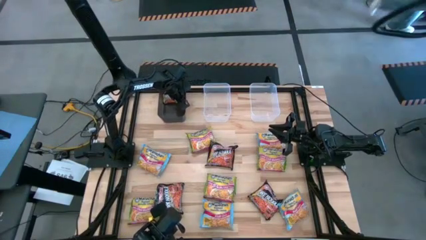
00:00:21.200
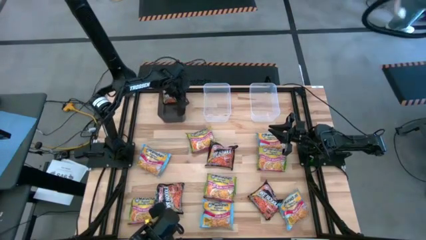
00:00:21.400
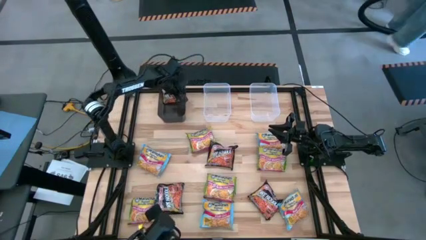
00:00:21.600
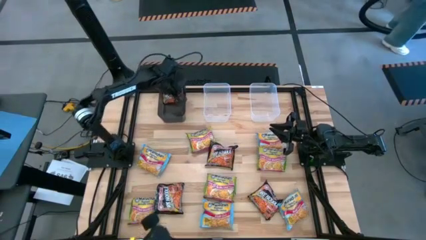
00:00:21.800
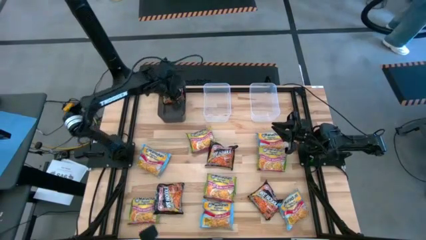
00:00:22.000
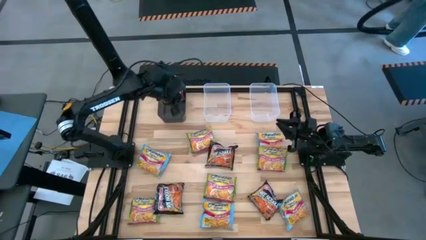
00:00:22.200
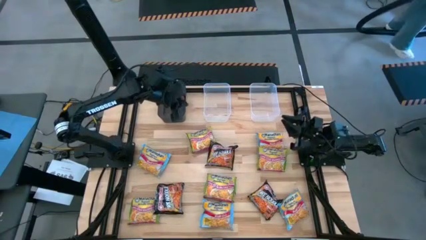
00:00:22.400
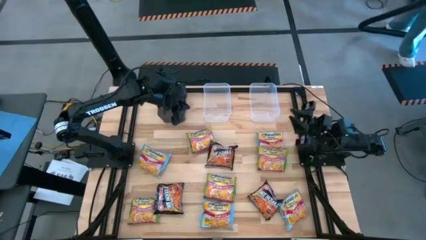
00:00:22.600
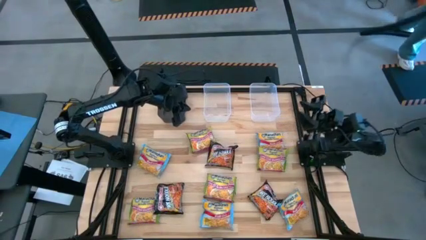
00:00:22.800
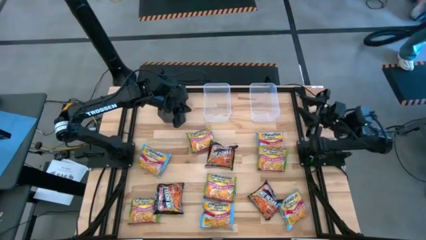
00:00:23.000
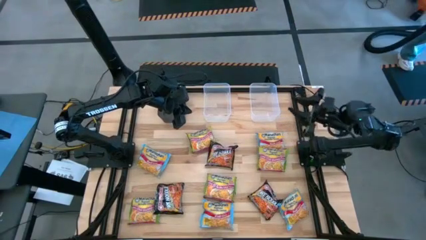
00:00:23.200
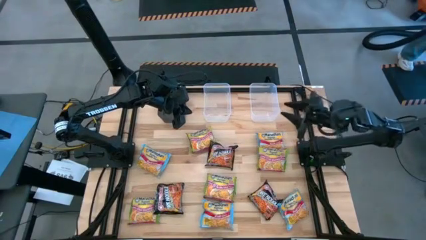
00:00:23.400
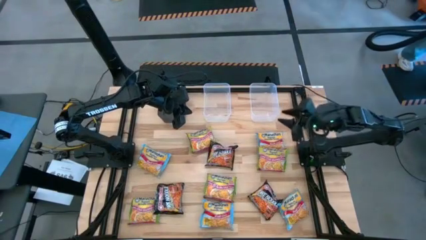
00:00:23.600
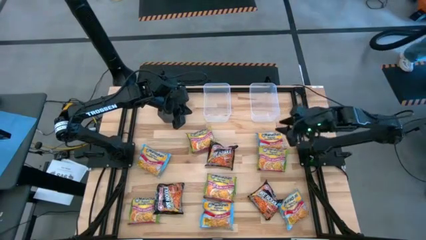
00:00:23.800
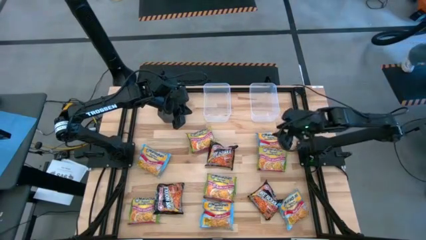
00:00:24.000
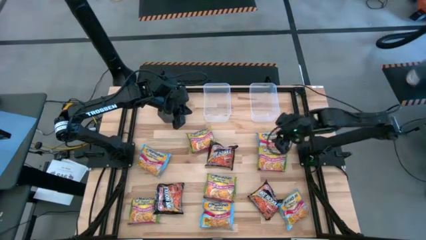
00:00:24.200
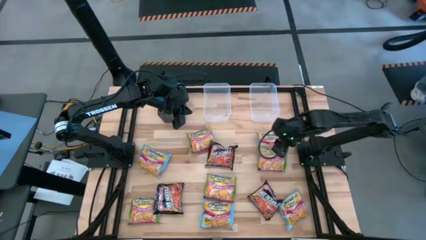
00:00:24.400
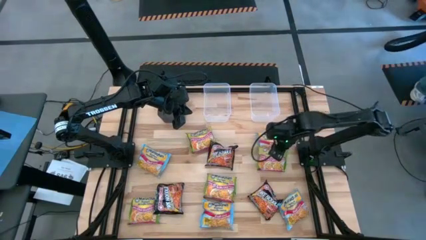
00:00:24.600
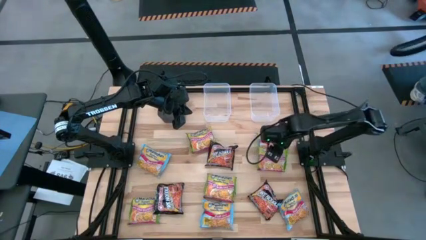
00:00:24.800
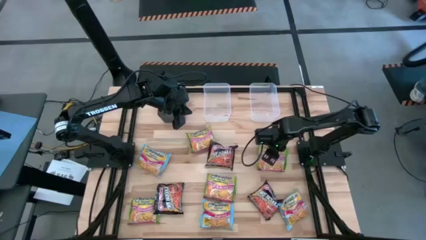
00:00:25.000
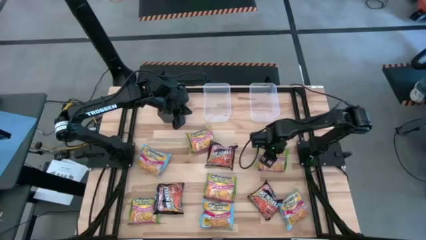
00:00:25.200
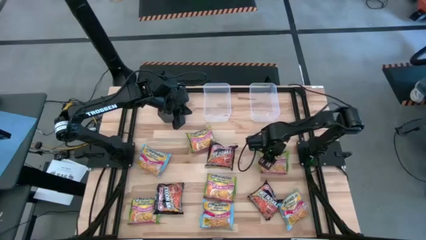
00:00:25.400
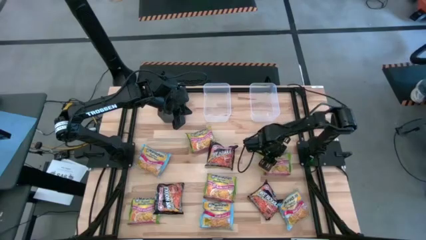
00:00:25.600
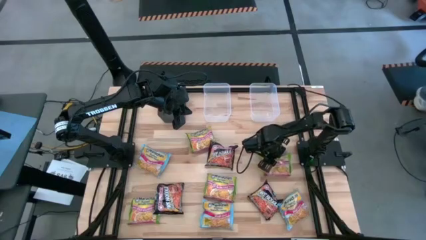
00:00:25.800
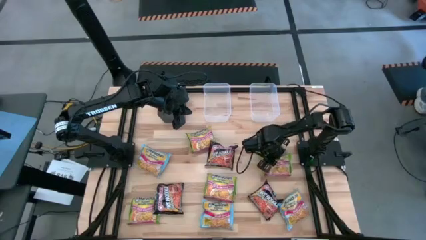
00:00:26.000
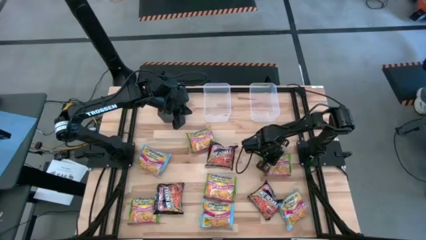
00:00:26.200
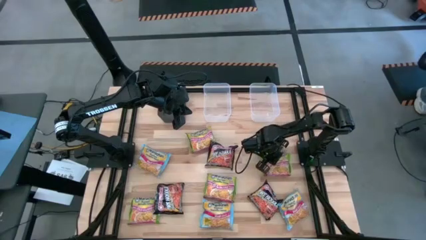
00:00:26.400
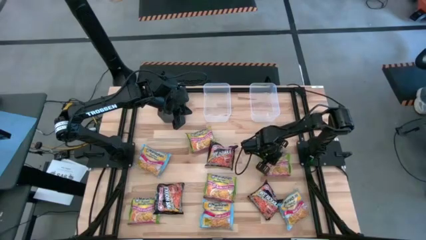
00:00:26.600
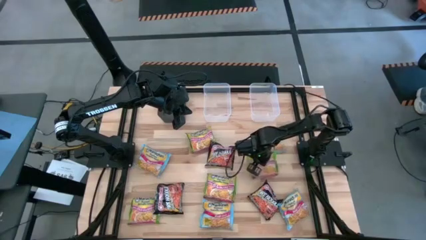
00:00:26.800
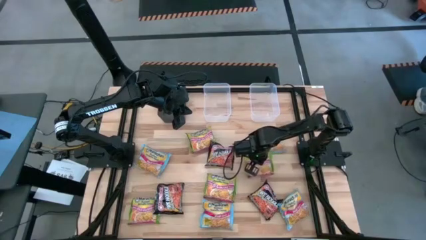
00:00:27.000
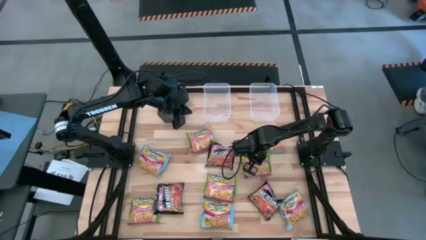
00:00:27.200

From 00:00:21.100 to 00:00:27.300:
Task: Sort Maruchan noodles
Put the top right green noodle pack into the right transparent bin

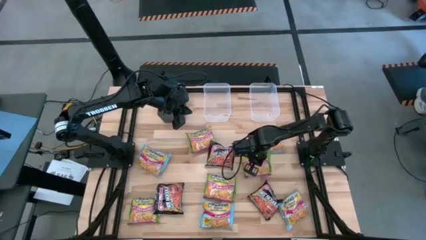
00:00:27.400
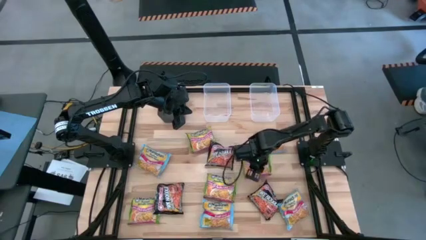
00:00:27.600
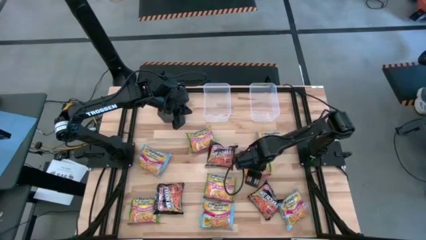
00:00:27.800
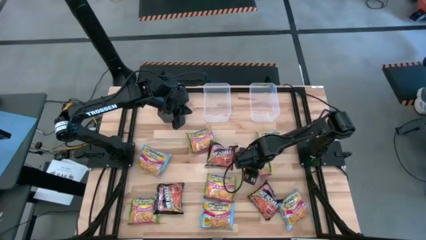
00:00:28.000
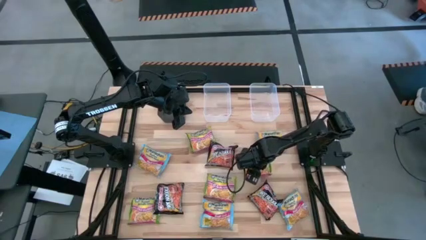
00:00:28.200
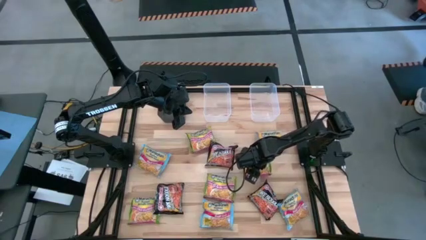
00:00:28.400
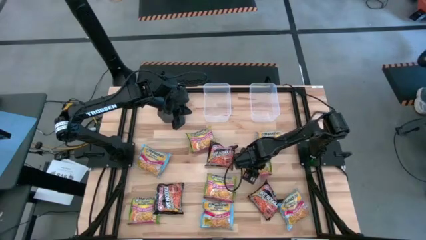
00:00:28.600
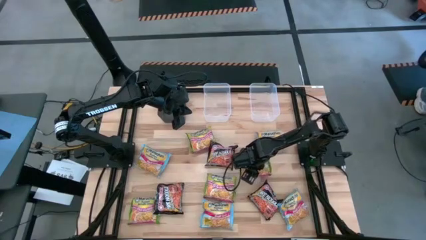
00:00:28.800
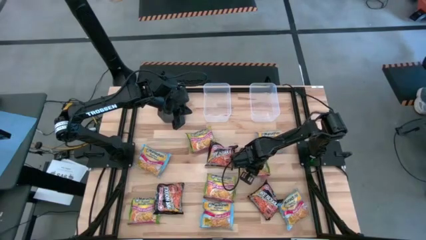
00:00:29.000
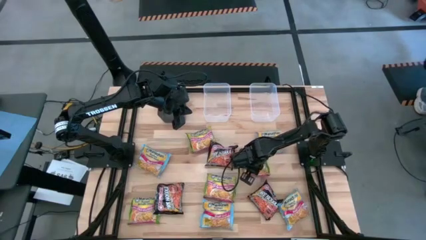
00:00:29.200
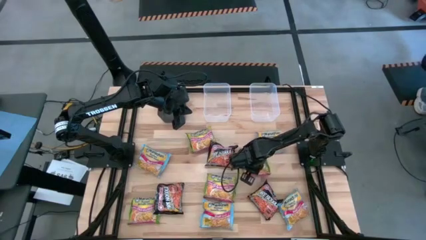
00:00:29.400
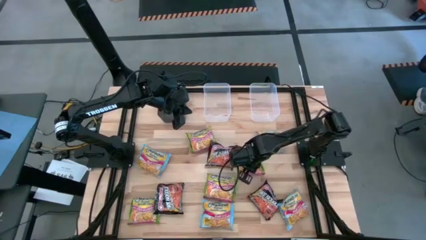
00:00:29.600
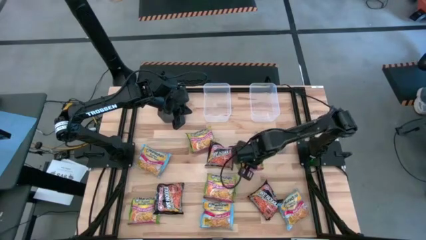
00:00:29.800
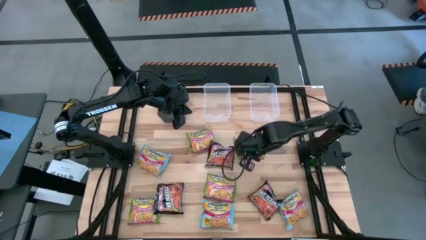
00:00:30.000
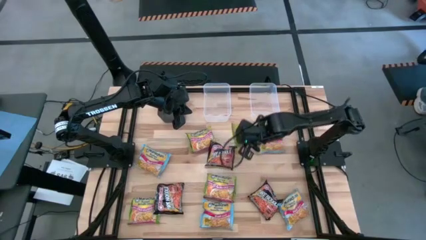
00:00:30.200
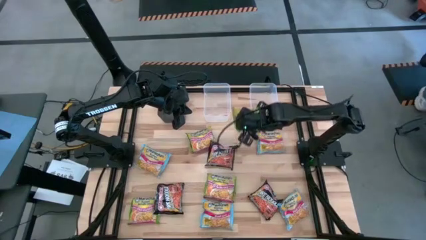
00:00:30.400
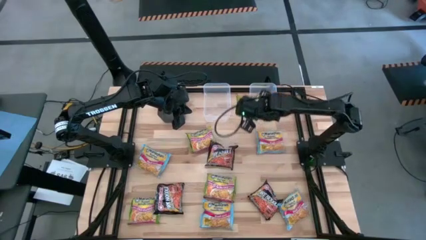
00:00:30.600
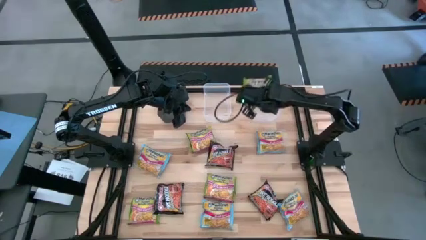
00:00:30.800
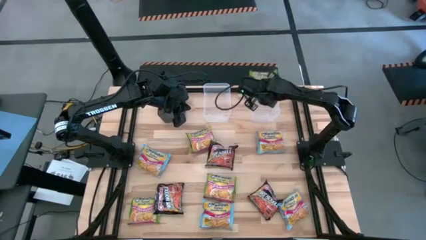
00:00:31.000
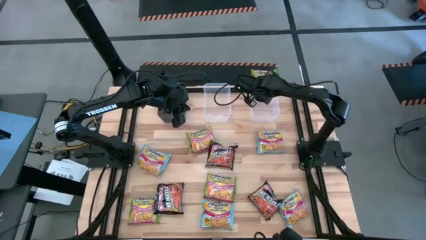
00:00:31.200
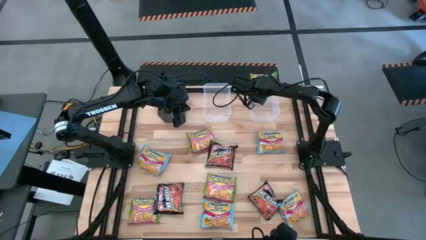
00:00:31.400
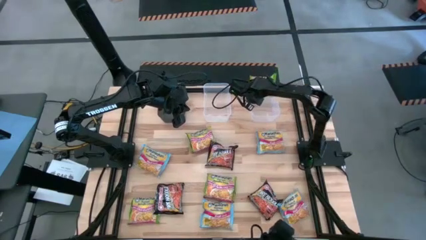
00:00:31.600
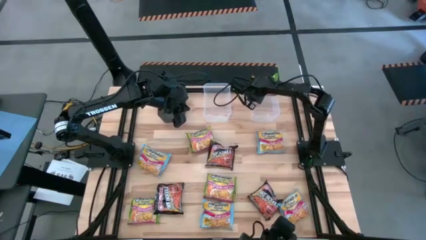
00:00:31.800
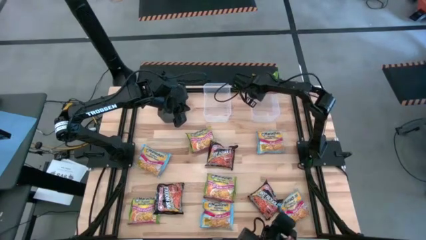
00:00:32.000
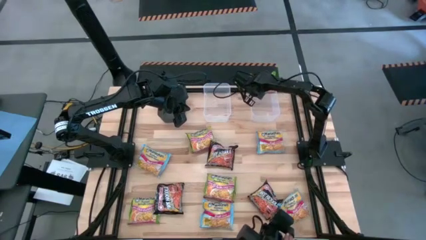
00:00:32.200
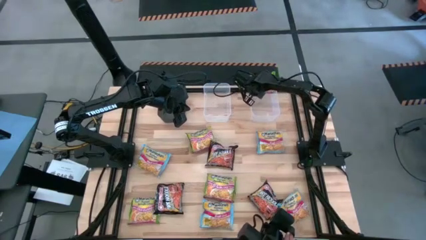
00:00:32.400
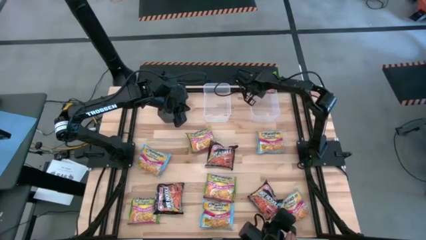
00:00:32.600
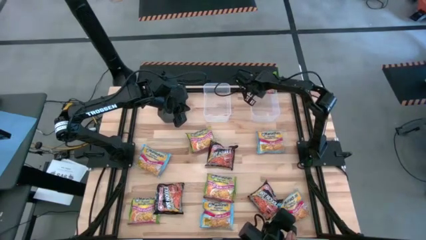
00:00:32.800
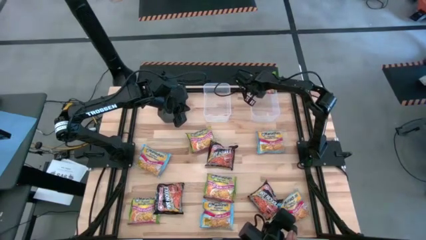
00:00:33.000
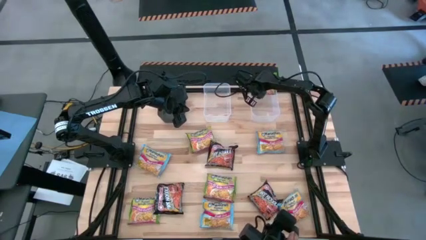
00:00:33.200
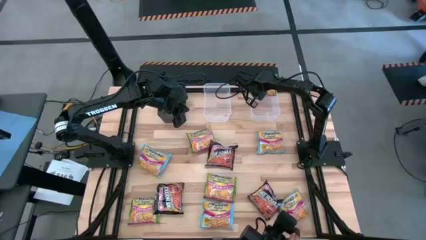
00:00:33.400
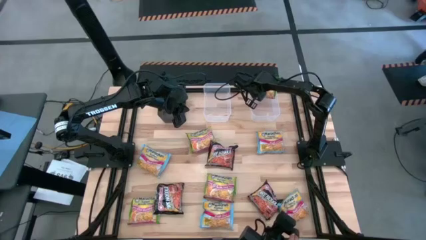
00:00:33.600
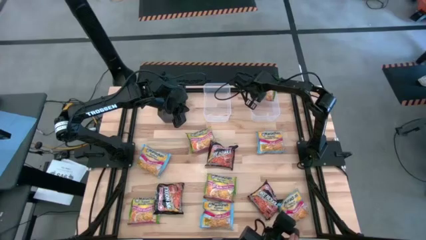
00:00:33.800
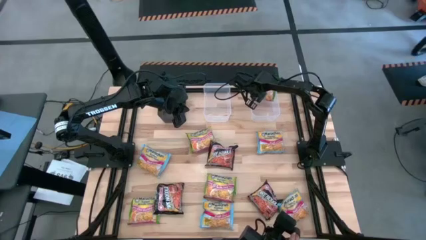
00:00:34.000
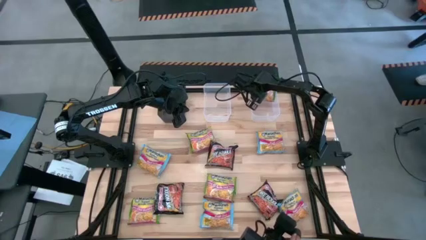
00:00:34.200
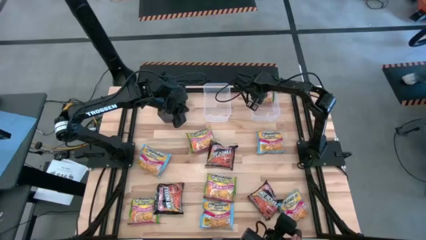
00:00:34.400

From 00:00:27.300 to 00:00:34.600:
Put the top right green noodle pack into the right transparent bin

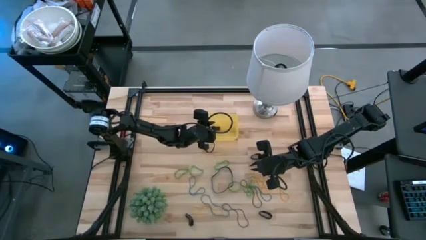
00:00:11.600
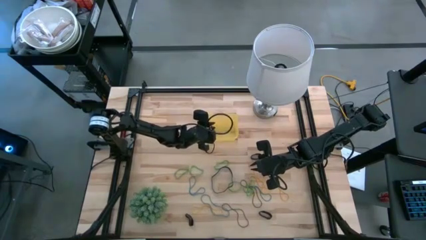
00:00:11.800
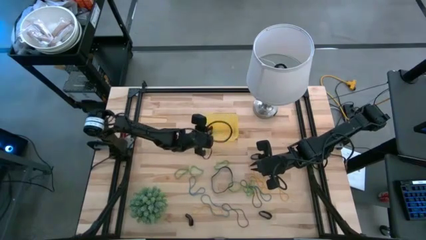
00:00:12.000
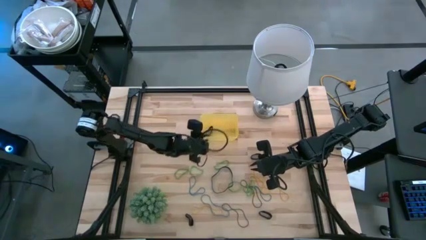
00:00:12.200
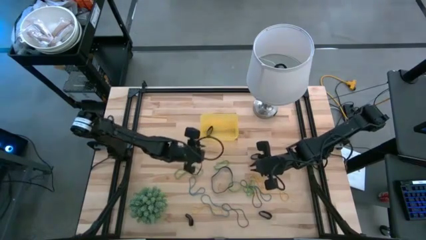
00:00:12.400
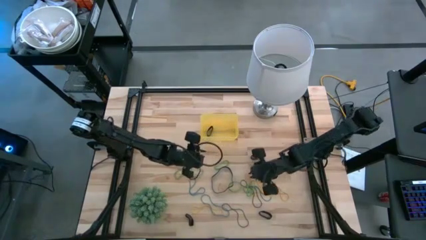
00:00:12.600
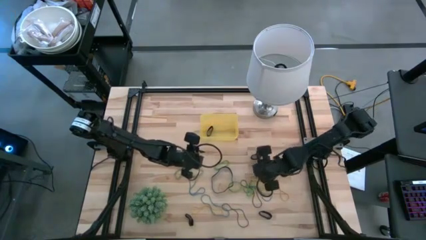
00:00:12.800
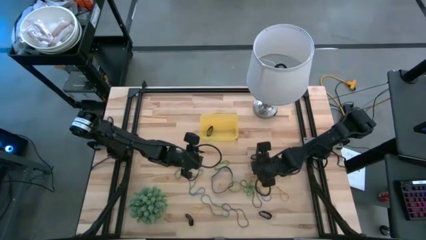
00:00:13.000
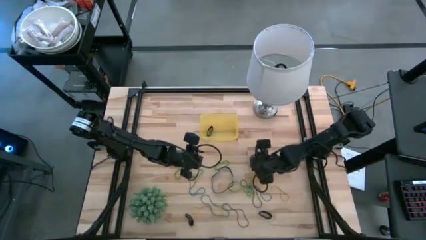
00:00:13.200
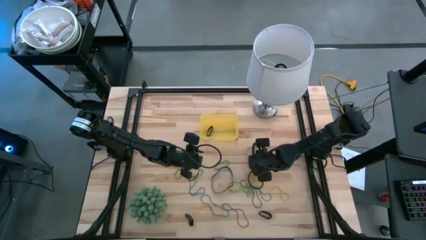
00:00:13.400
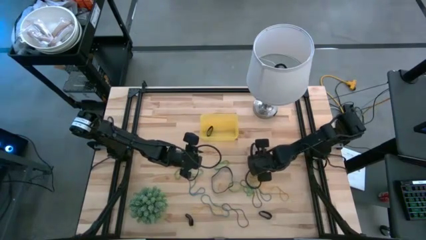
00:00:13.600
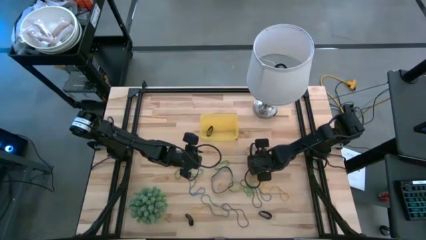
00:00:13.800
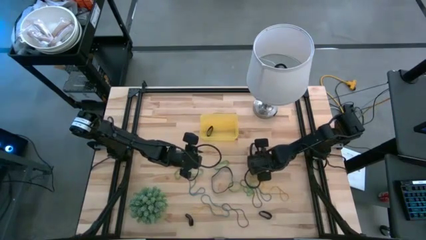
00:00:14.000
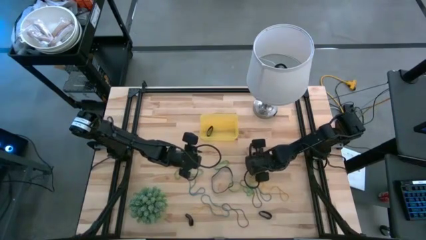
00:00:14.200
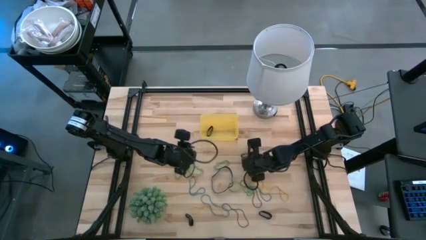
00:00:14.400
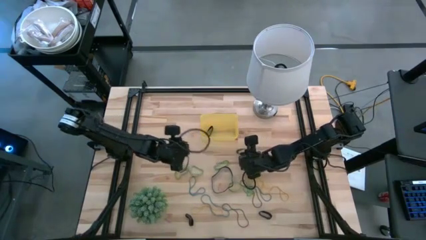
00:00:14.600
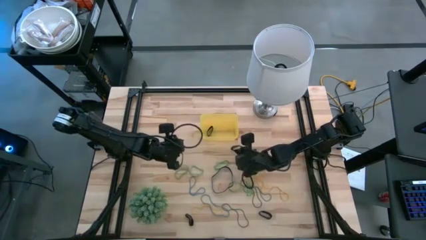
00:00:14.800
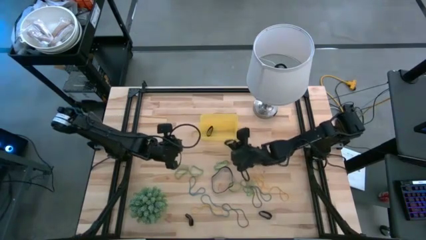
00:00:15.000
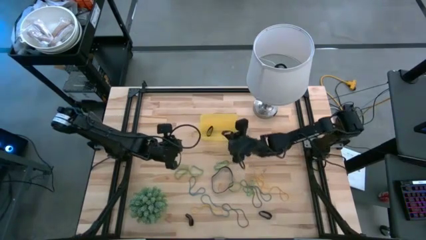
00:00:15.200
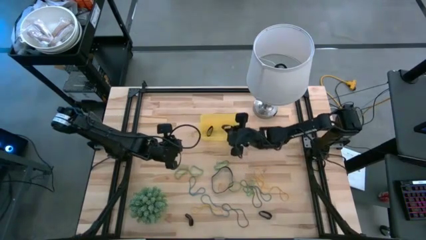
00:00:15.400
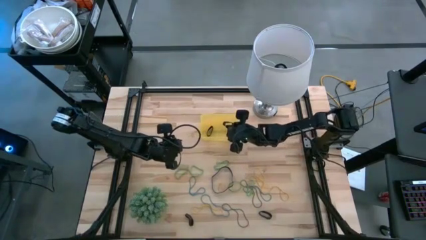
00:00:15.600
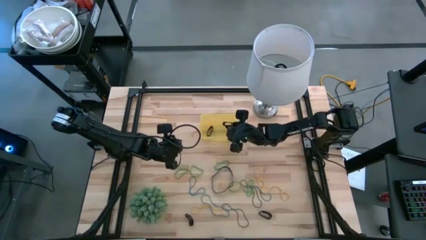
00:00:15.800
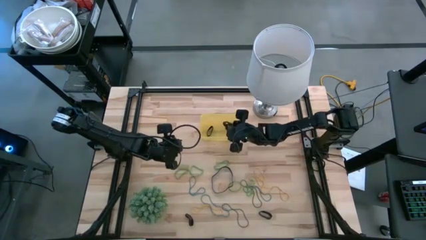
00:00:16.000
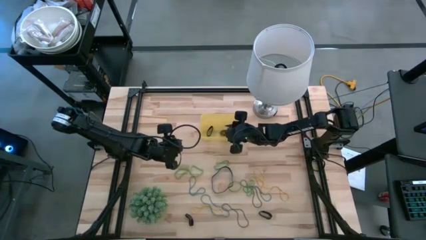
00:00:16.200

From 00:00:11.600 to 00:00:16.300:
Task: Pick and place rubber bands into bin
Put the black rubber band into the yellow bin
